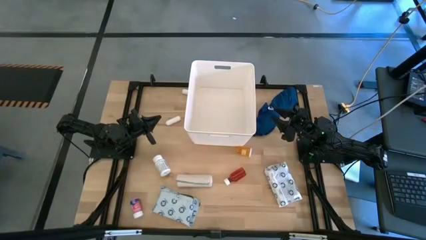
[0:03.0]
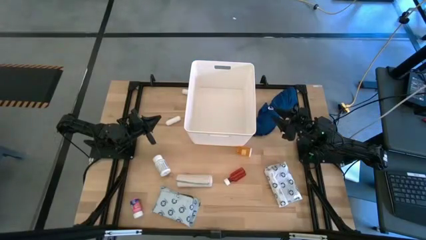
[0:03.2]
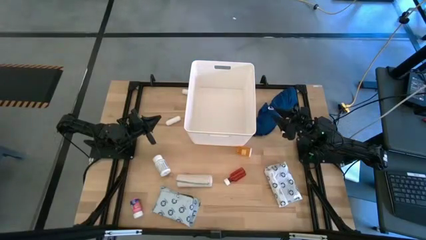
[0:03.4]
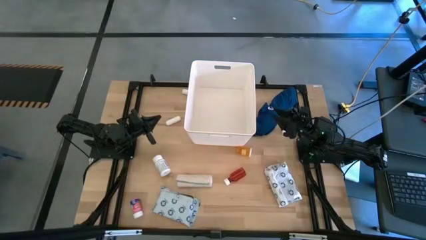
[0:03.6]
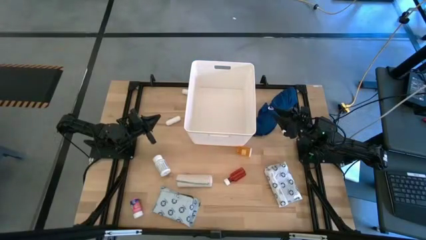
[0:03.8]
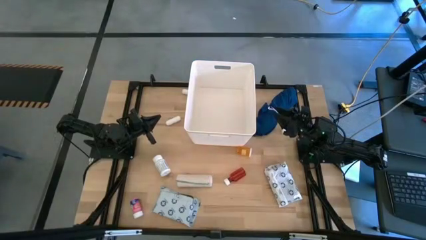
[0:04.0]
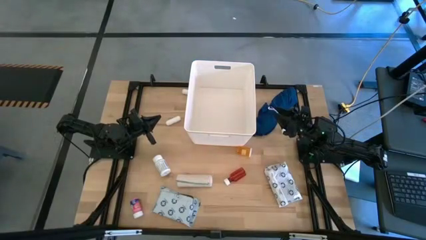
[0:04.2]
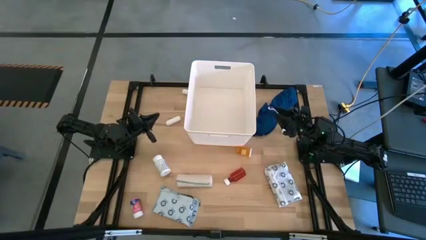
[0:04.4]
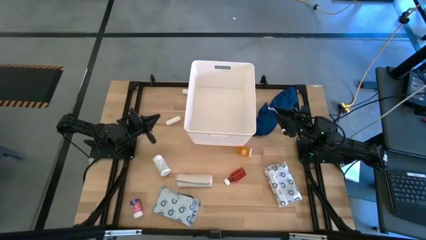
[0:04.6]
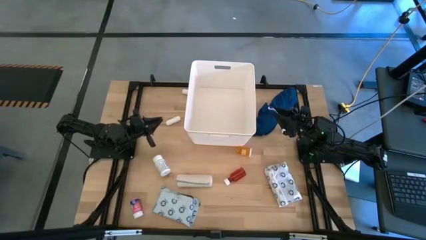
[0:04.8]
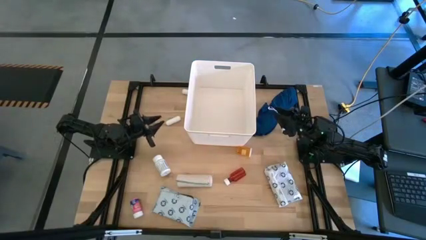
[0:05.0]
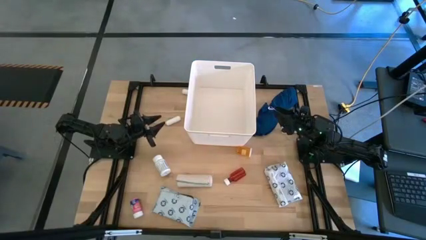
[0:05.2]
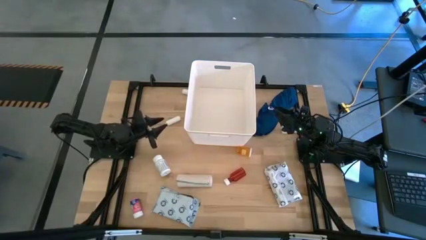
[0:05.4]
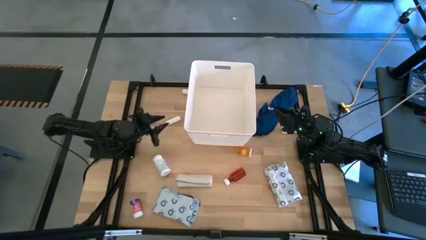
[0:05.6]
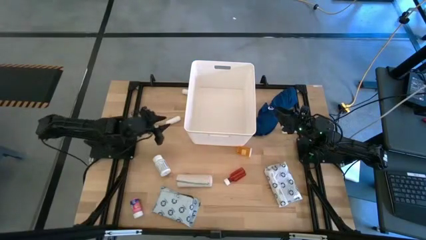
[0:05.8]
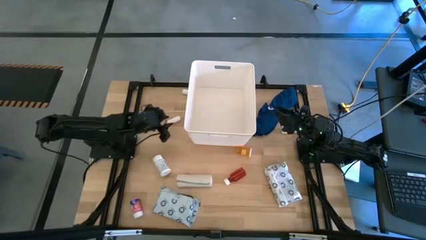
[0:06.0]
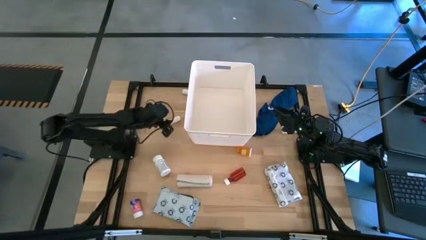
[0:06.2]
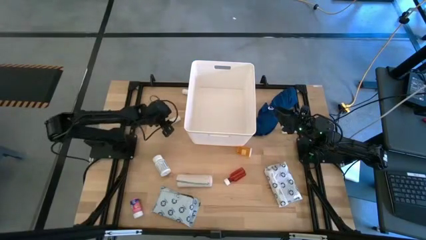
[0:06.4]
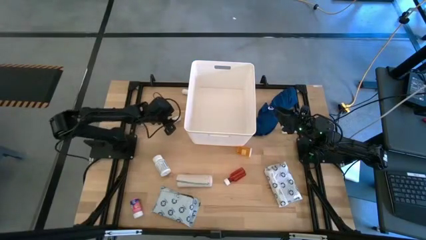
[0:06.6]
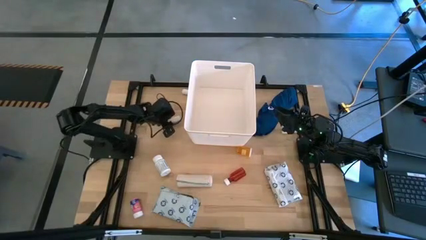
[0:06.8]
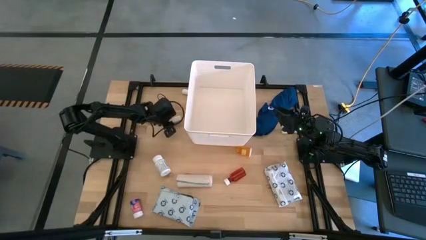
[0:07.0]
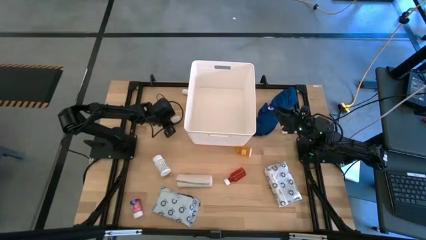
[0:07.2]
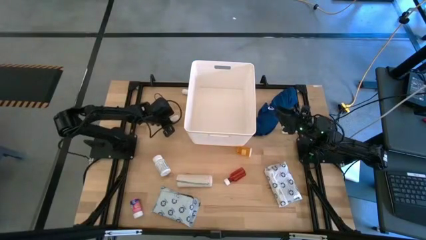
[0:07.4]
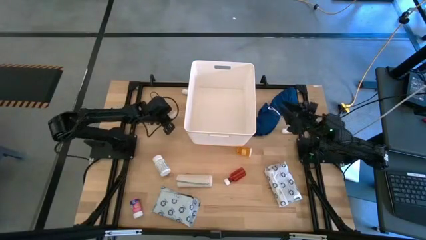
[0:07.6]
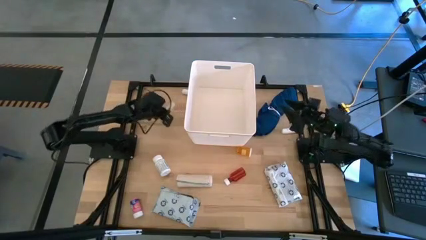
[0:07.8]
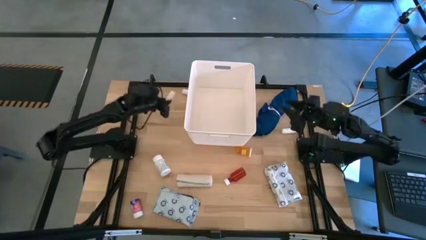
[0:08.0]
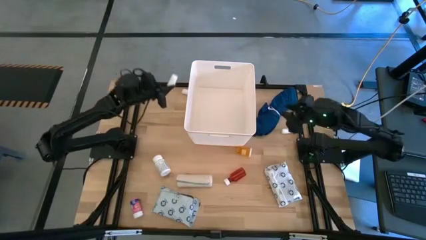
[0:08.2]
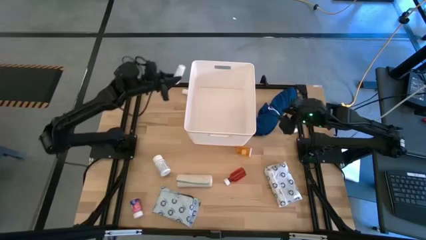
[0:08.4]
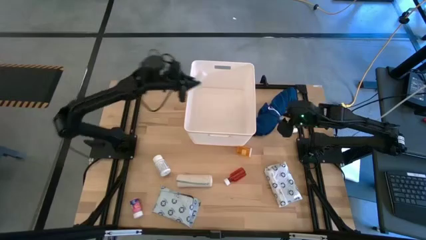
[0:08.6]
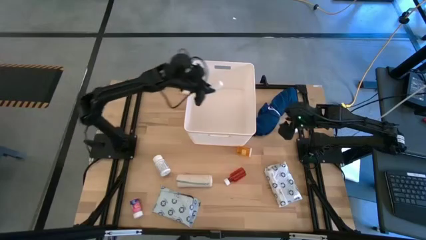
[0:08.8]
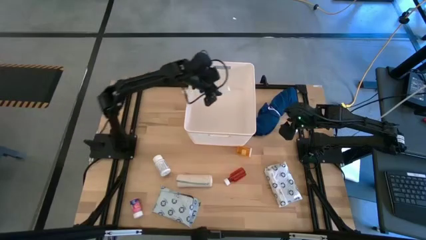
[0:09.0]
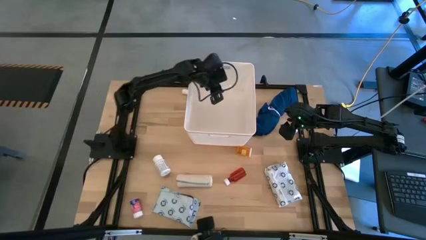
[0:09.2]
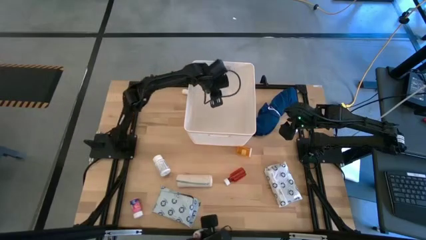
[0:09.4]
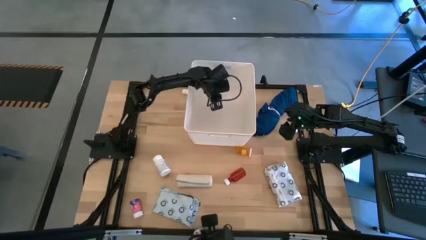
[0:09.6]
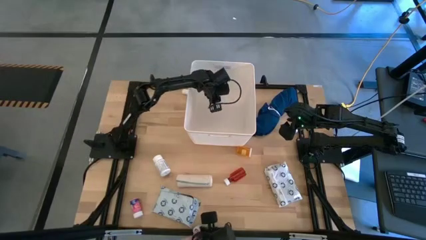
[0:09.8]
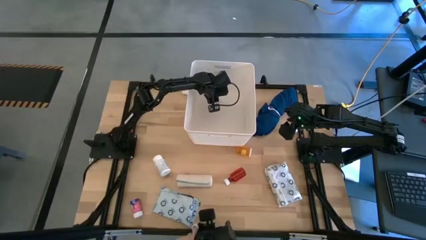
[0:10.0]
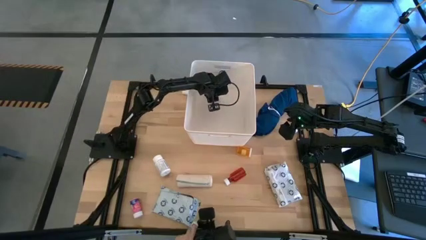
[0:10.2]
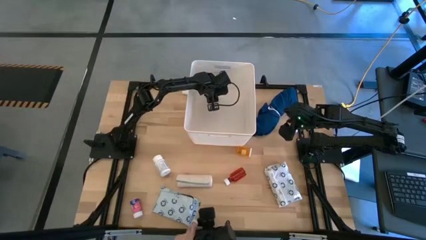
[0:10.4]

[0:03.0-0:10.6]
Task: Pick & place medical supplies in basket/bin
Put the bottom left white rolled gauze into the white basket

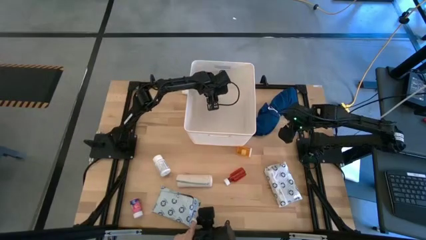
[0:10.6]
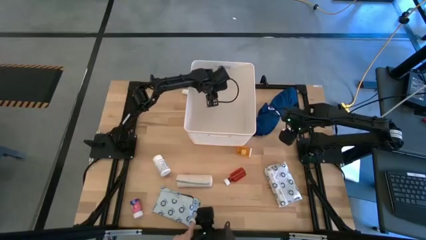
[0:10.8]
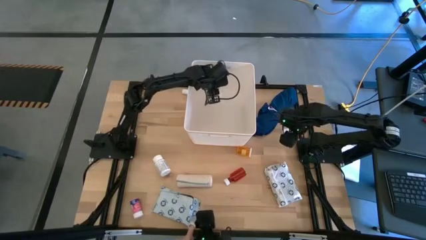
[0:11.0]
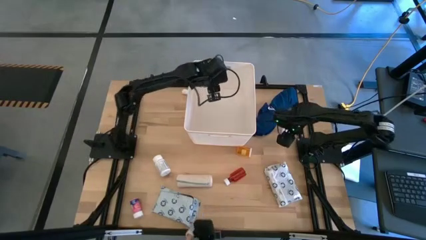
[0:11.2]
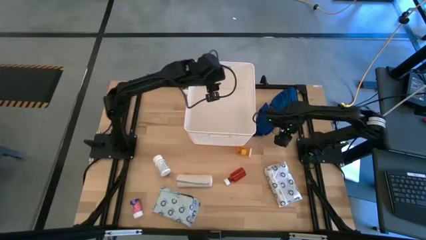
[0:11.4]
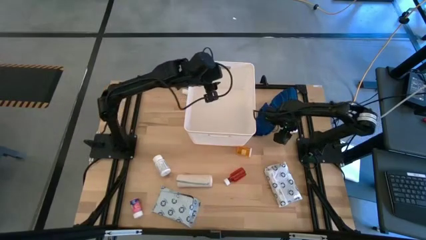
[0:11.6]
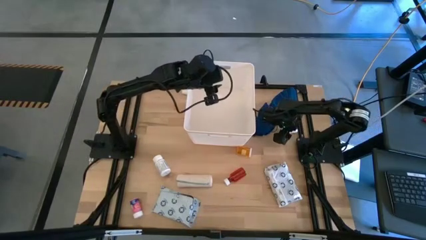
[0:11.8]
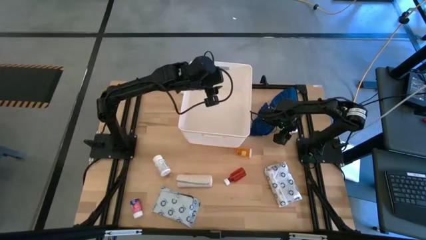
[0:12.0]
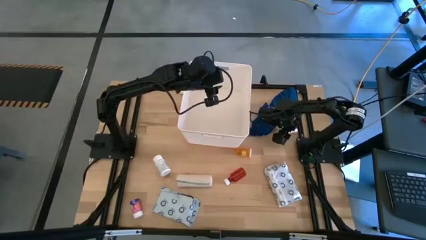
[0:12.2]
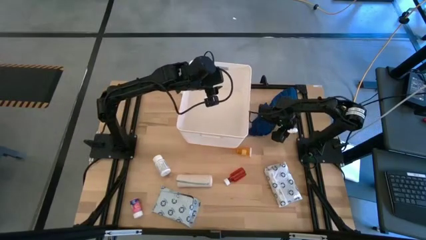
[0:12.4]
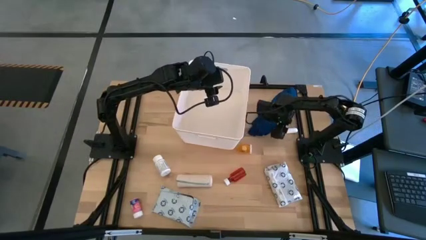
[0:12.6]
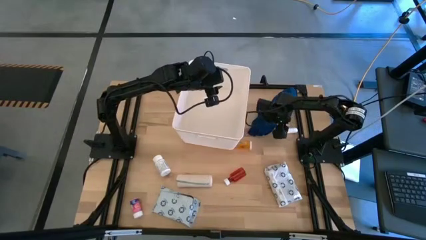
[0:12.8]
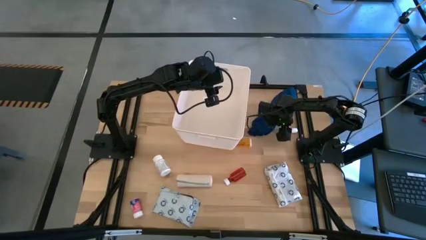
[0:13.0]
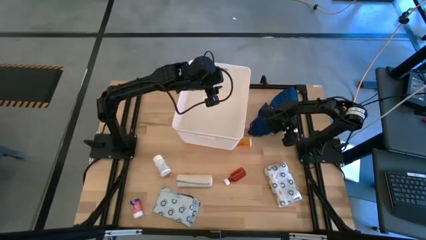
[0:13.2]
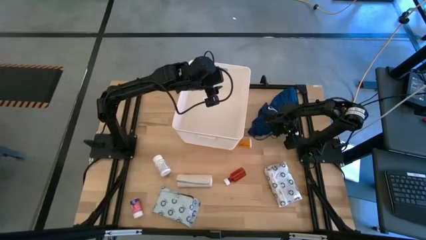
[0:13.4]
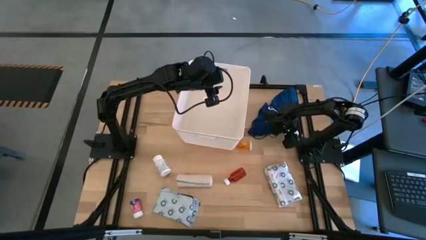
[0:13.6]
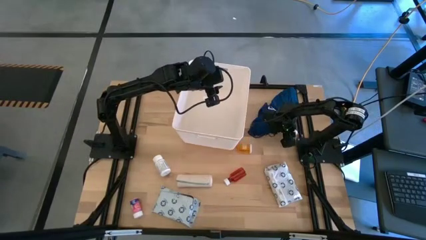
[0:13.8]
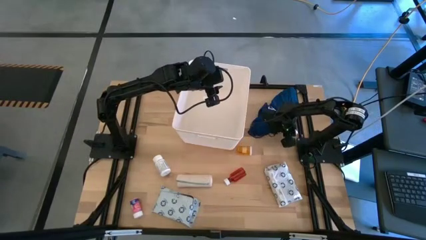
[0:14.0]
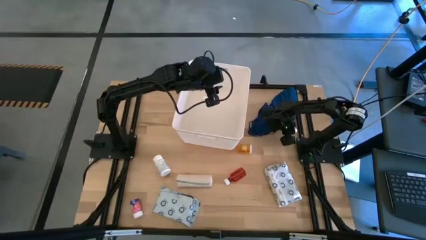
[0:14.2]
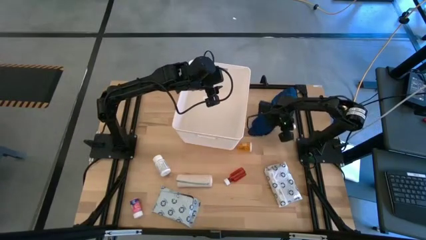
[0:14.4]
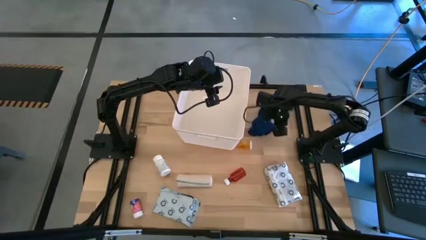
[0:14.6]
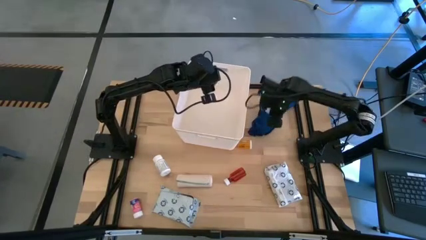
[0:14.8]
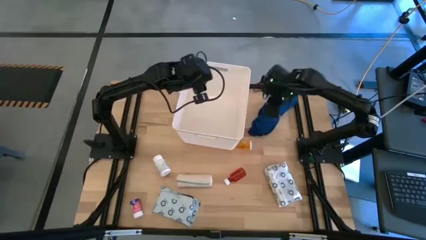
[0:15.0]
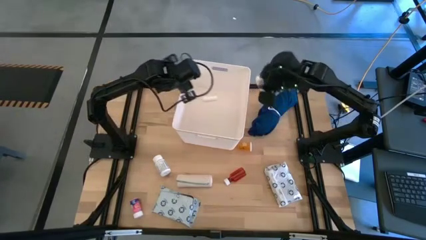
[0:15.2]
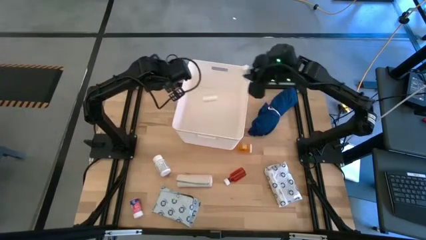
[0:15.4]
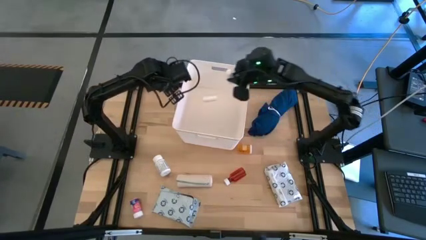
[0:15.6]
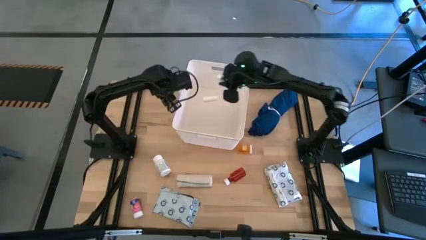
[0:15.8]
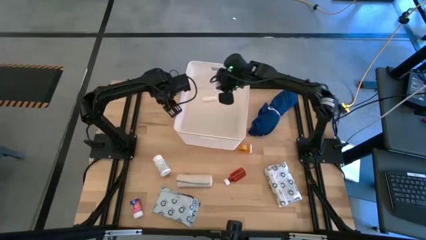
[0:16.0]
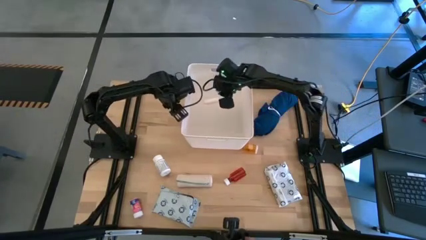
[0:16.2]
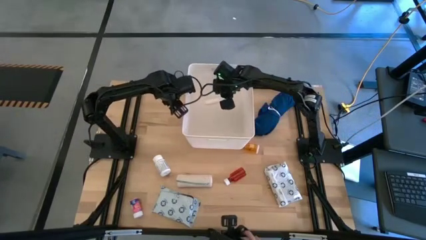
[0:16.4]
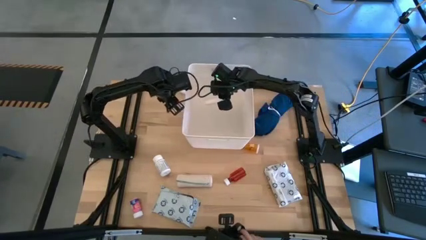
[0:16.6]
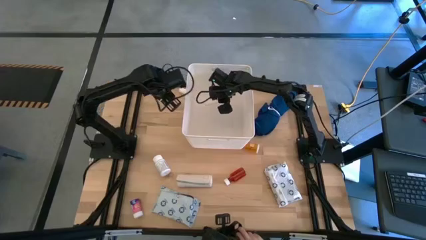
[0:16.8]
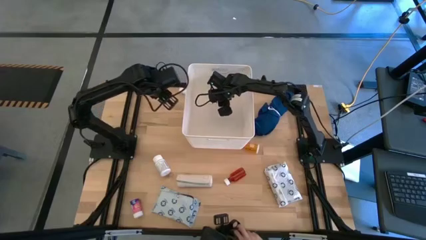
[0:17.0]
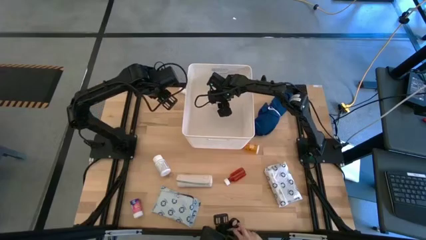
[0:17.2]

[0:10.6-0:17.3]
Put the bottom white rolled gauze into the white basket

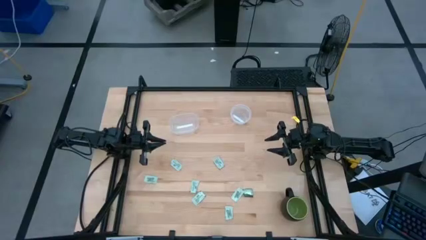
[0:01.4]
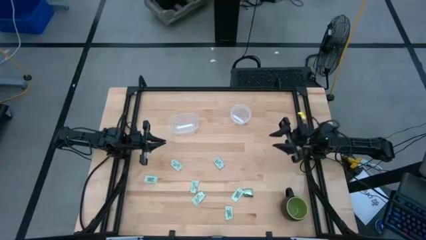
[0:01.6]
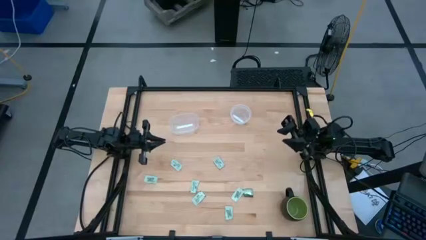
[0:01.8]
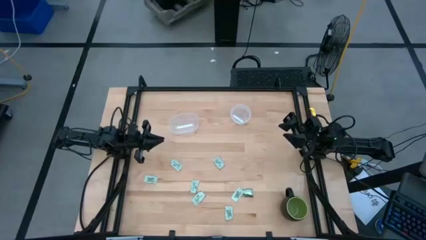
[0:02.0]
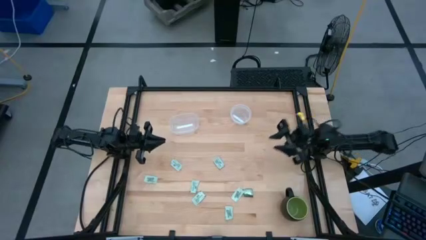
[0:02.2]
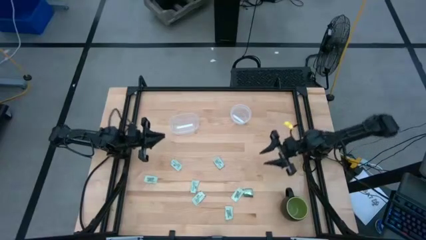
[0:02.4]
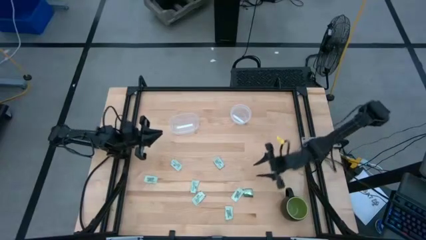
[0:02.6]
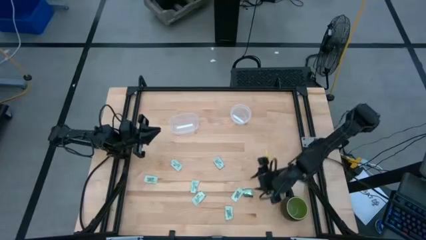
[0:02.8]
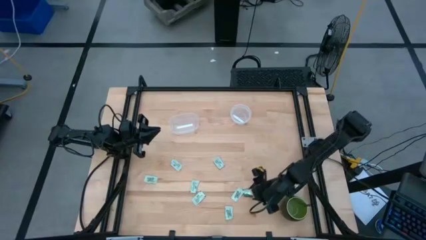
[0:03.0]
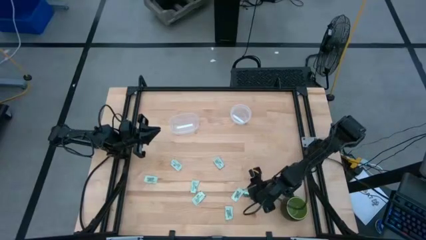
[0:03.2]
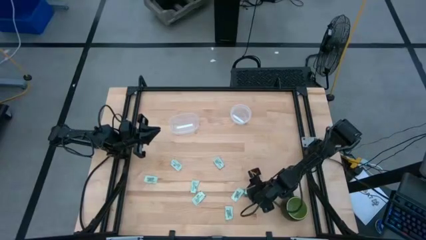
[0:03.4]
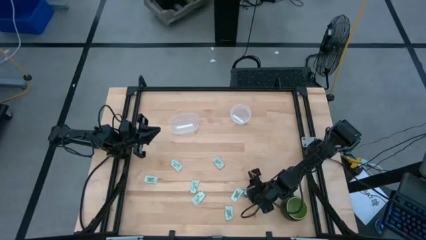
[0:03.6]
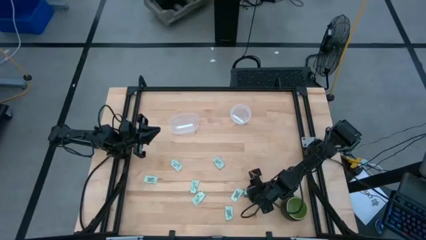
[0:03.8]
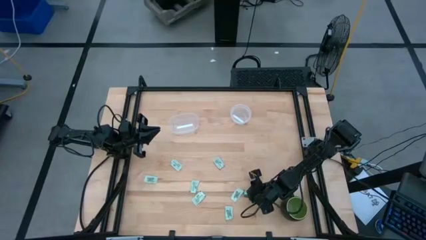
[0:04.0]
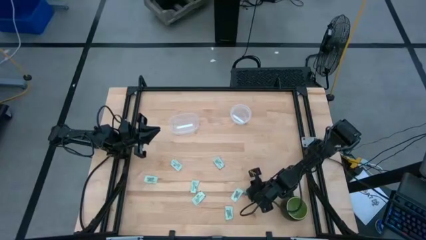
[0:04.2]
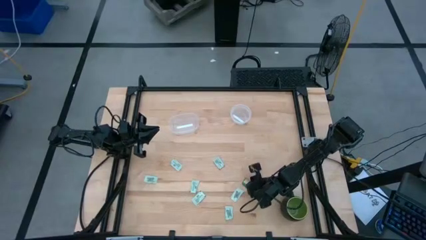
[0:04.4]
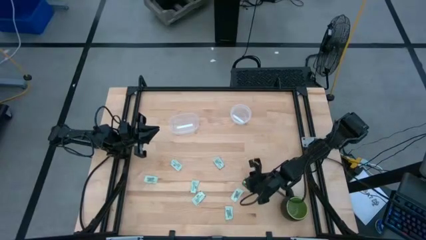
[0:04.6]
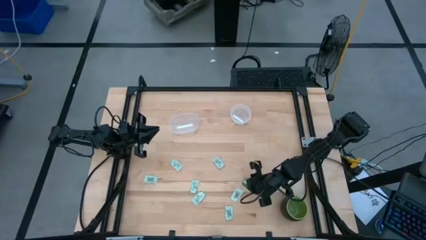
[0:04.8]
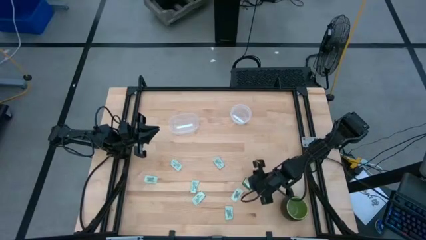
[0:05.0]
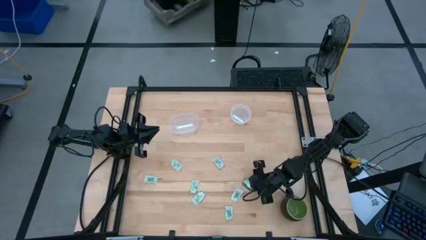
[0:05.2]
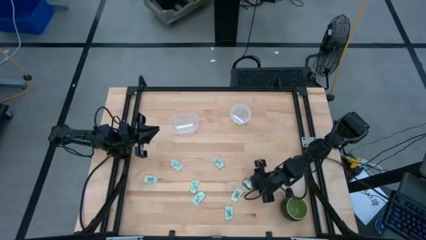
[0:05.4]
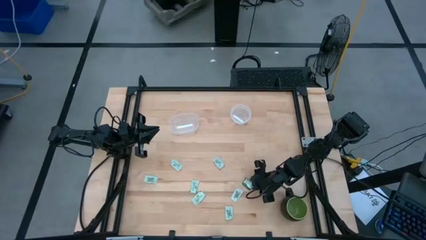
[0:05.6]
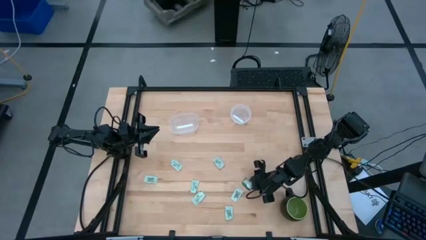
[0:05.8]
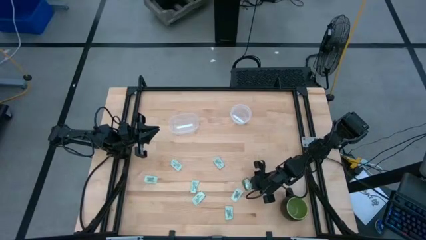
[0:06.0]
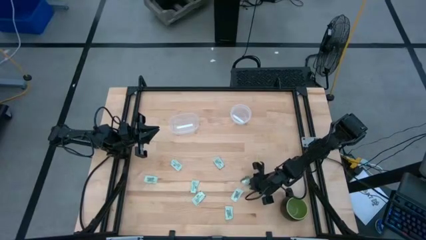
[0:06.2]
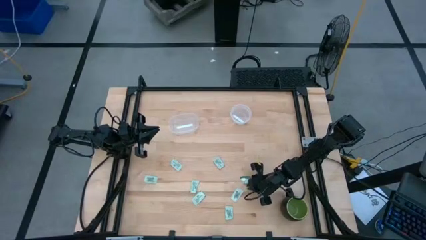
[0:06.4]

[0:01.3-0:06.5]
Task: Pick and place Stevia / Truvia into bins
Put the green stevia packet into the right transparent container
